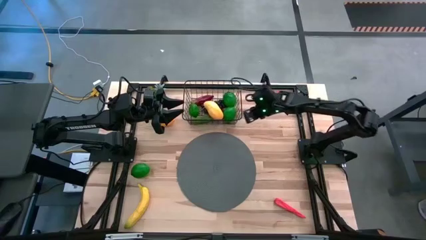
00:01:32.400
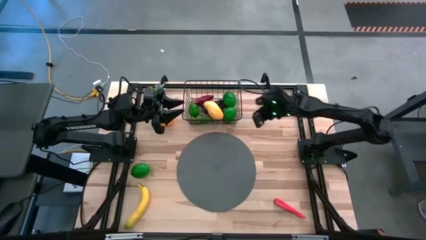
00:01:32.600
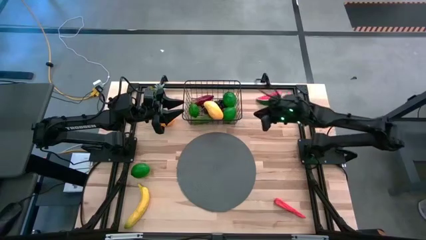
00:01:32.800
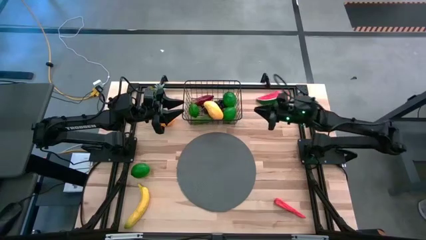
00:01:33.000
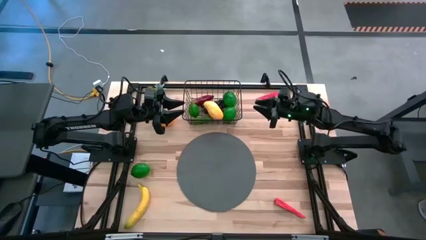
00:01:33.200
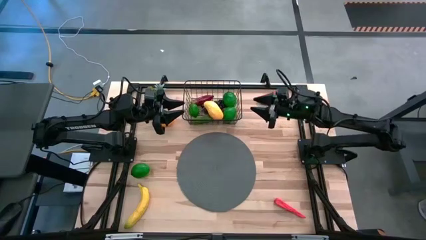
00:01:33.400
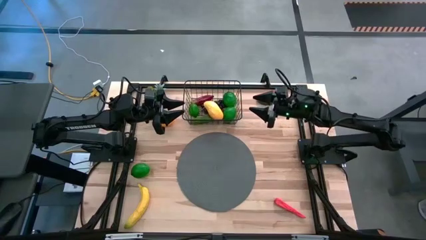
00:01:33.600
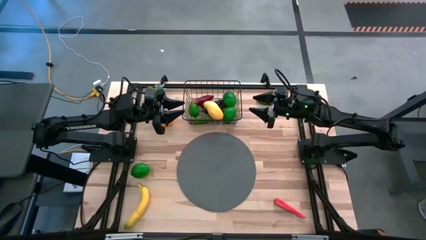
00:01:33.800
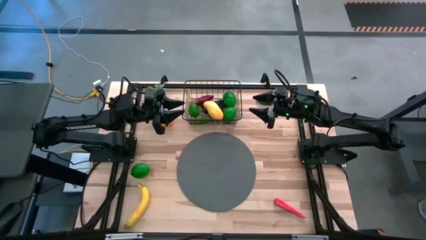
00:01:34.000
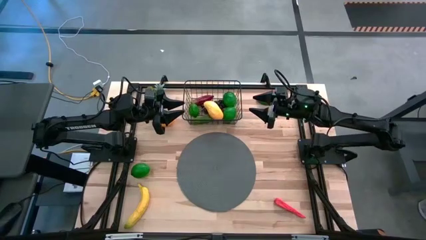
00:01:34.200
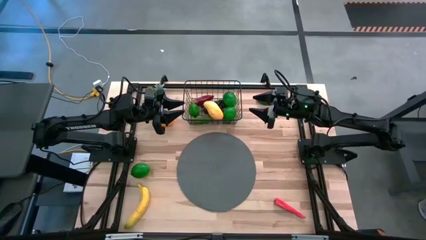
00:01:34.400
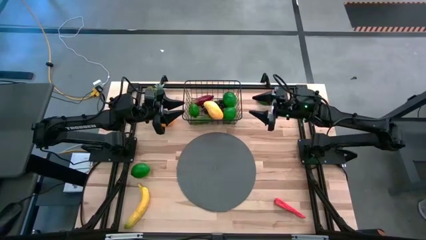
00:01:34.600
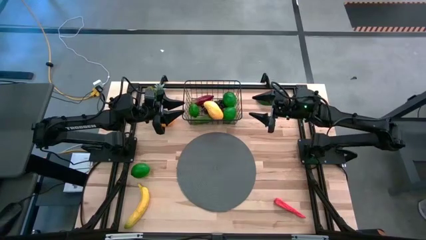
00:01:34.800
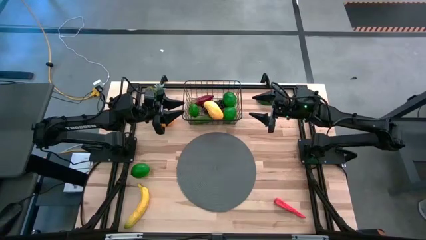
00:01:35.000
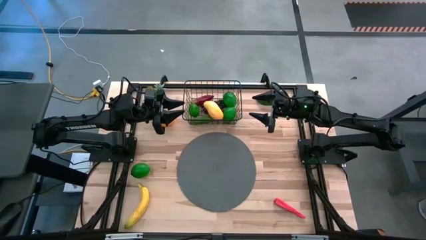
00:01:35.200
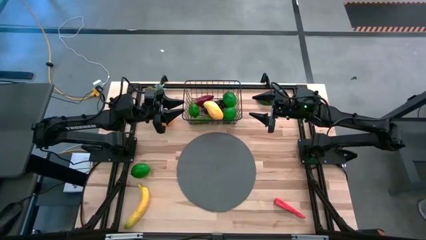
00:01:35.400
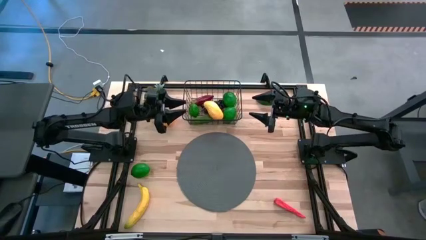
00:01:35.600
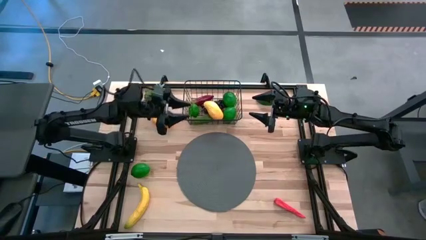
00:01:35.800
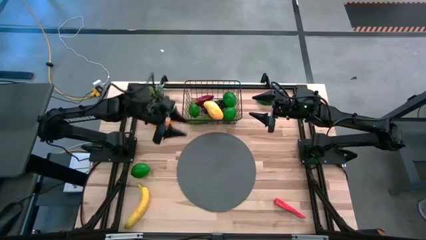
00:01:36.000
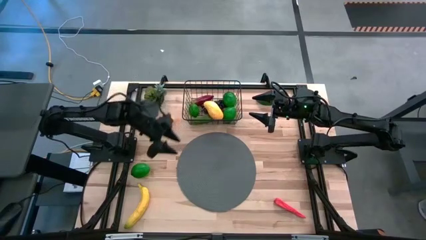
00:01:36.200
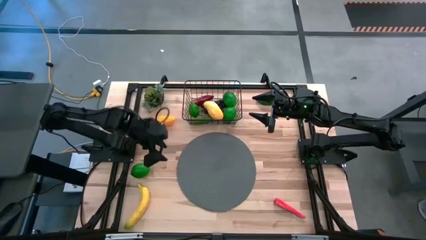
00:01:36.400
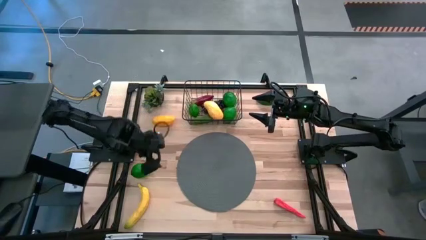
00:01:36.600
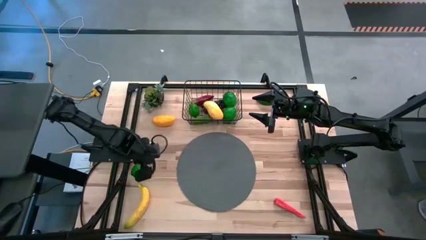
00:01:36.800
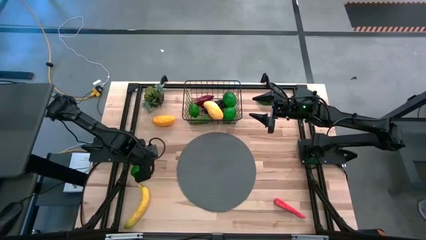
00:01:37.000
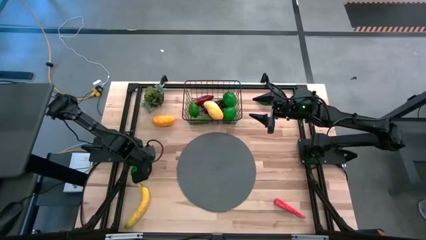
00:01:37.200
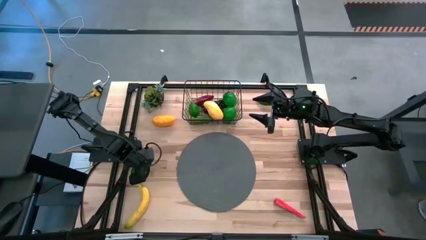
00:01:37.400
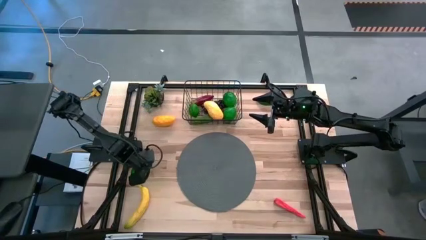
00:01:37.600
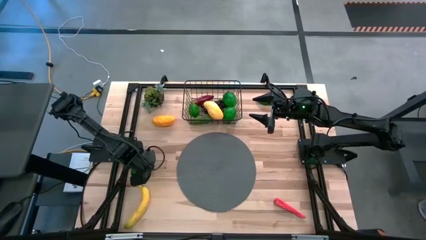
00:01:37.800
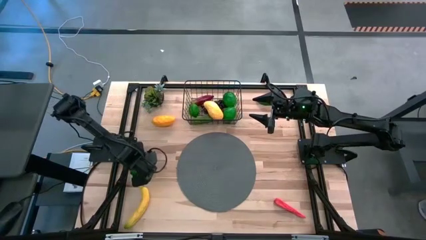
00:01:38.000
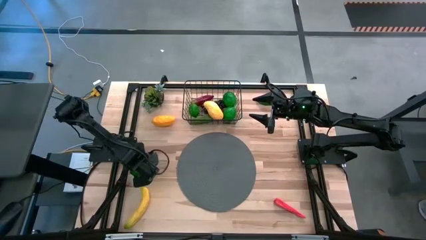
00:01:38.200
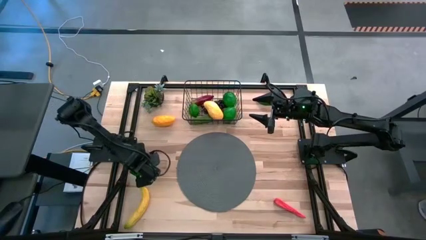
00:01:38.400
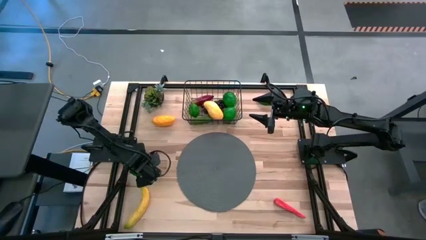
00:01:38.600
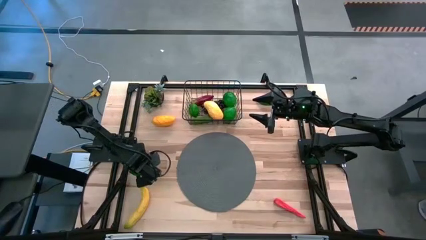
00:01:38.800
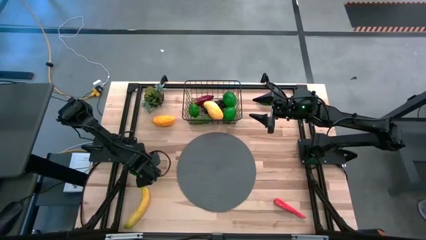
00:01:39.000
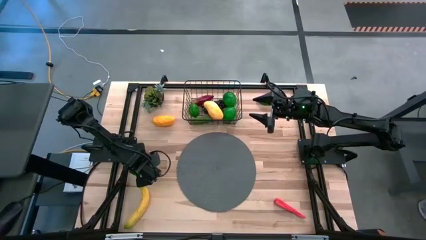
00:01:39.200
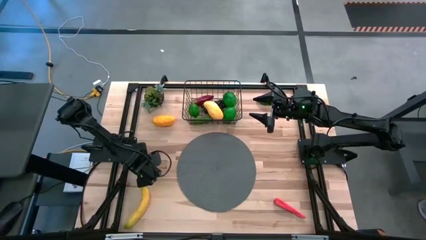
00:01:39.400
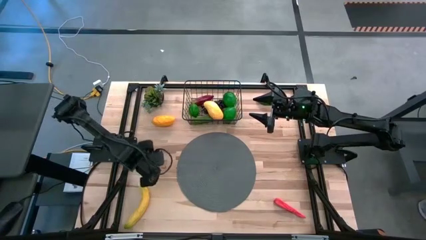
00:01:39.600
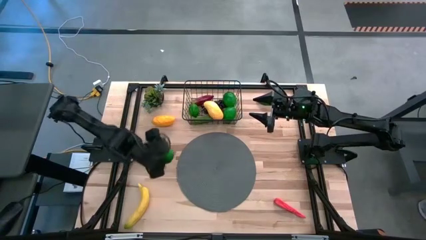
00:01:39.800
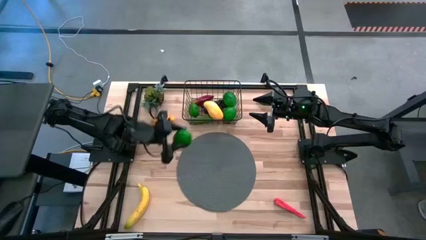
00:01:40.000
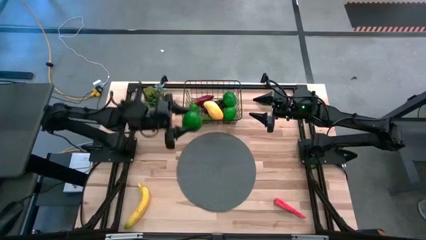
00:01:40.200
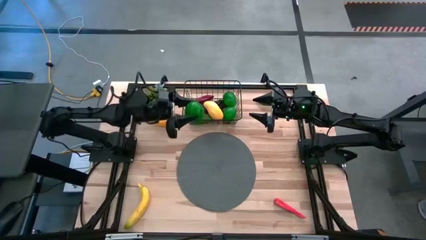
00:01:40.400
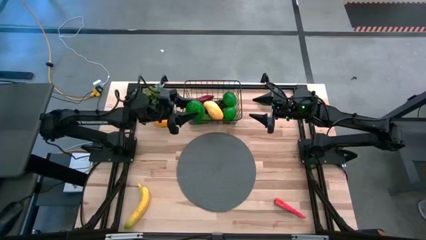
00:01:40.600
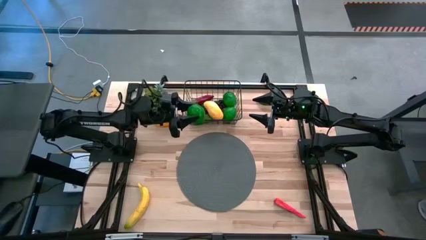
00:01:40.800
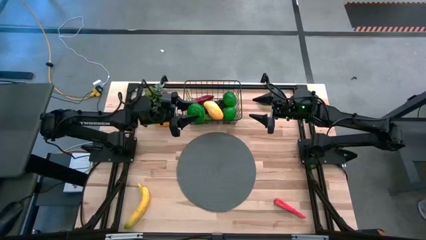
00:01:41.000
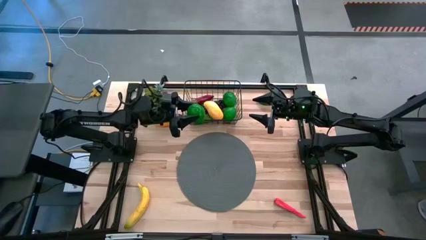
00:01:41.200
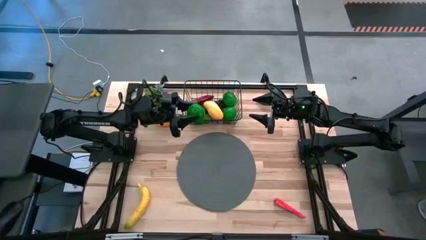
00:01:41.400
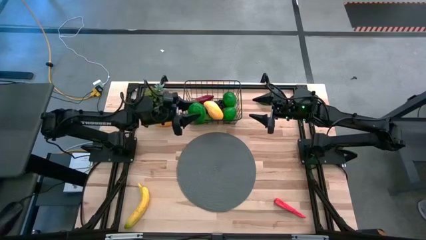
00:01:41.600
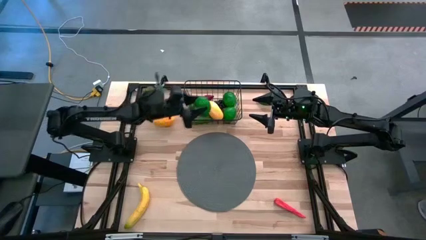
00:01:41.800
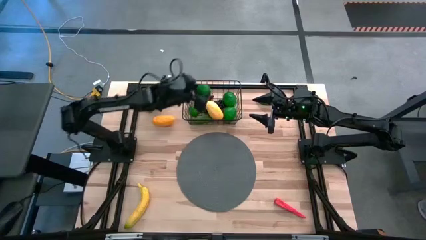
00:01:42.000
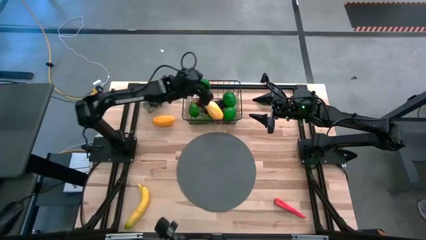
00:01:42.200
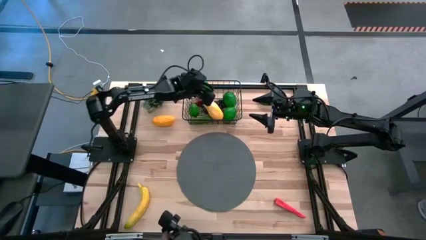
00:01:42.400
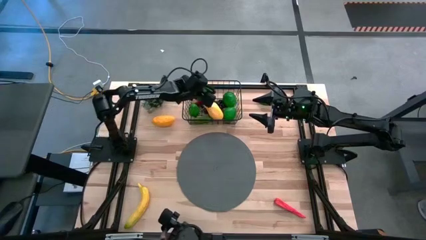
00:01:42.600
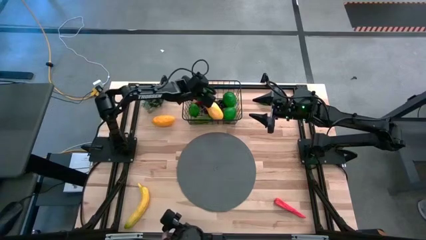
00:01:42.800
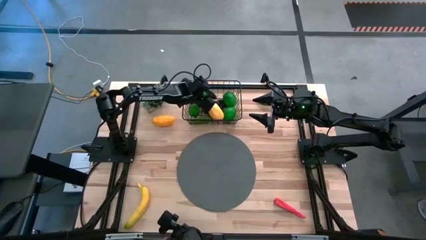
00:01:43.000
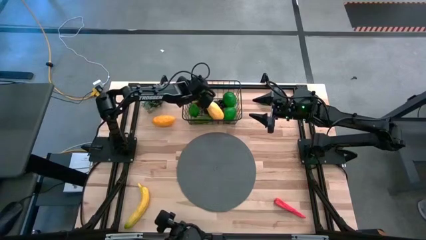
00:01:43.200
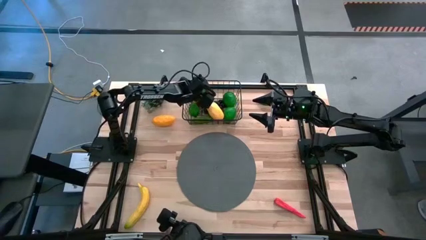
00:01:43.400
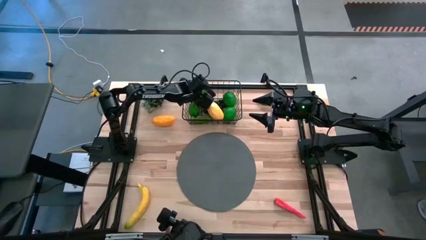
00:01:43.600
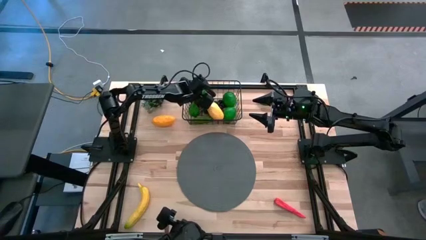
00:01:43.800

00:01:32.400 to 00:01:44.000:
Task: Build produce basket
Put the green lime into the black wire basket
